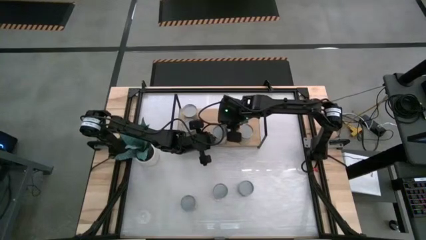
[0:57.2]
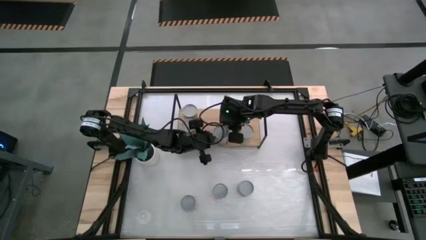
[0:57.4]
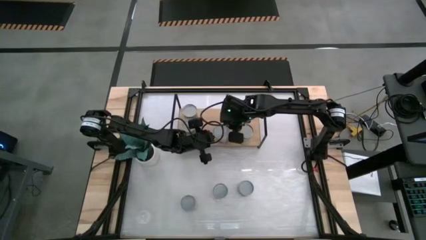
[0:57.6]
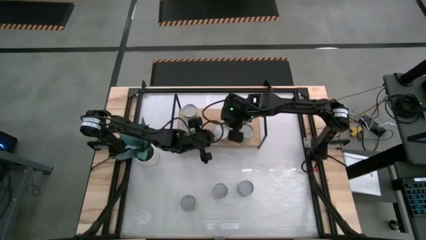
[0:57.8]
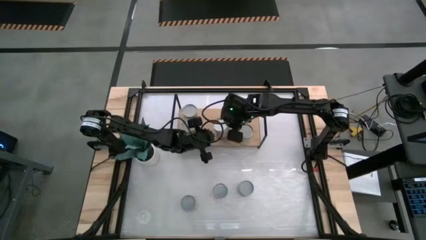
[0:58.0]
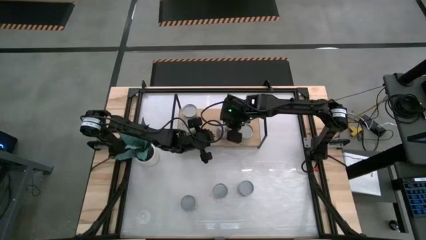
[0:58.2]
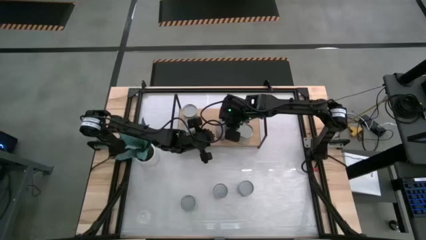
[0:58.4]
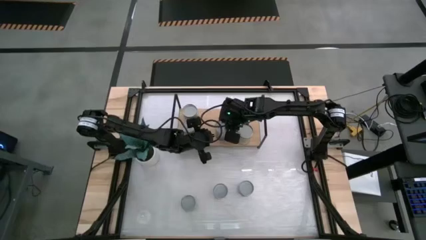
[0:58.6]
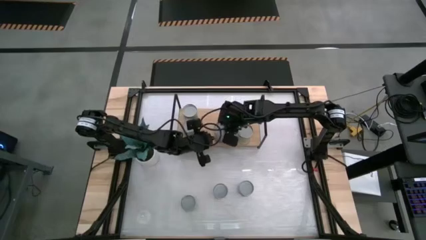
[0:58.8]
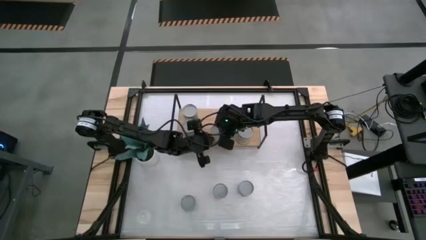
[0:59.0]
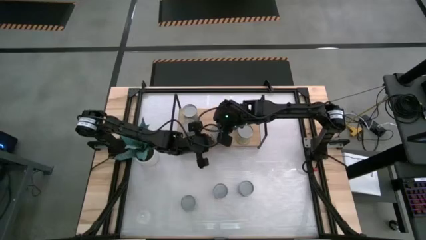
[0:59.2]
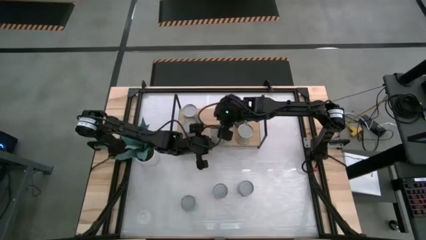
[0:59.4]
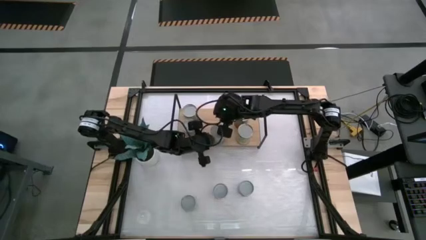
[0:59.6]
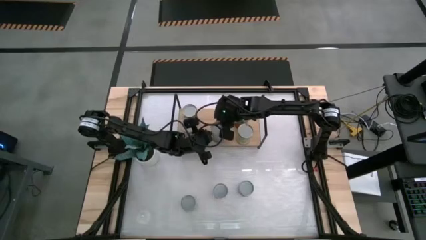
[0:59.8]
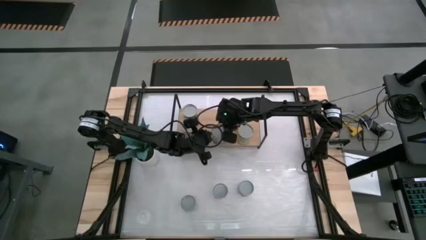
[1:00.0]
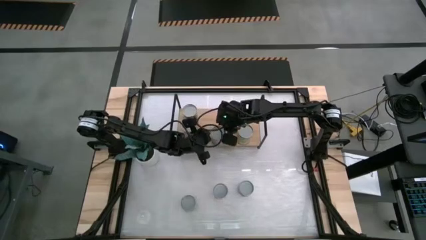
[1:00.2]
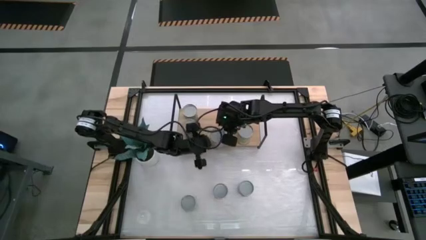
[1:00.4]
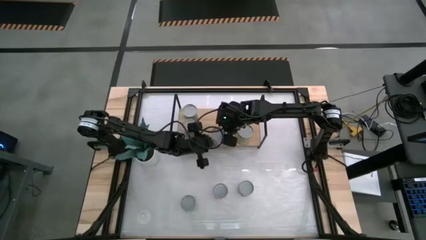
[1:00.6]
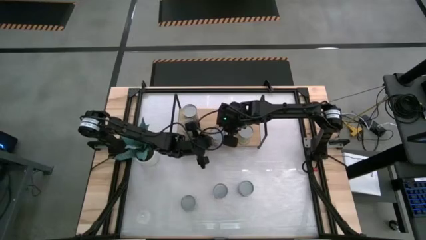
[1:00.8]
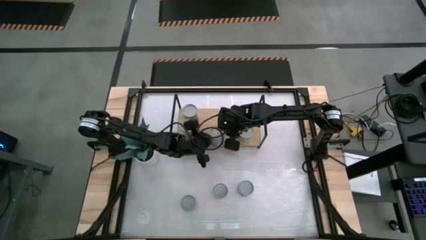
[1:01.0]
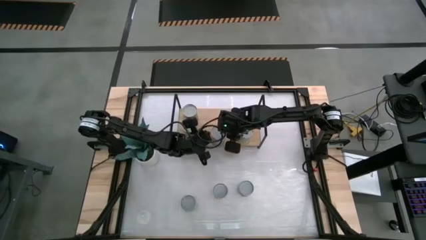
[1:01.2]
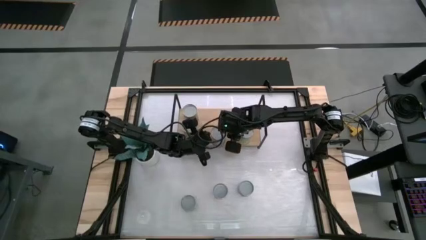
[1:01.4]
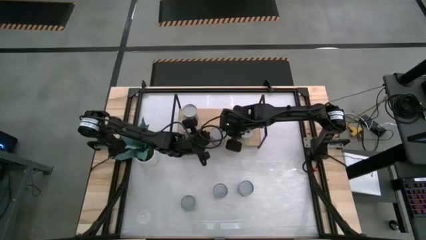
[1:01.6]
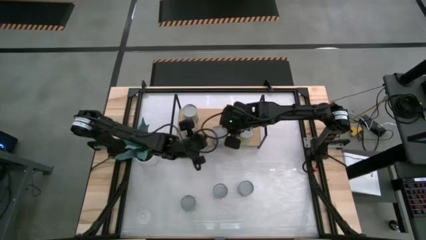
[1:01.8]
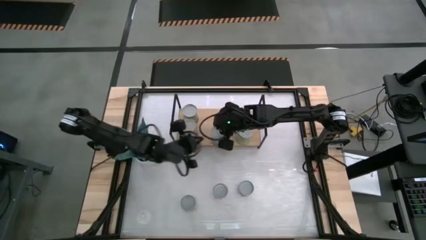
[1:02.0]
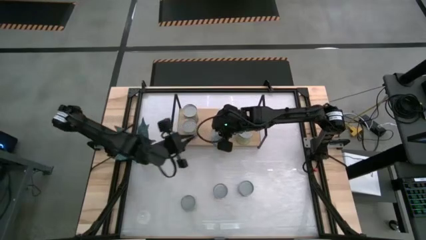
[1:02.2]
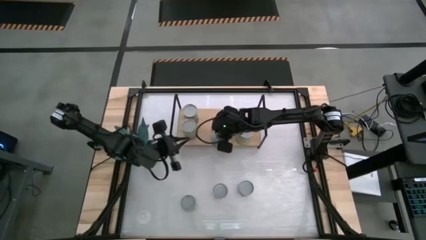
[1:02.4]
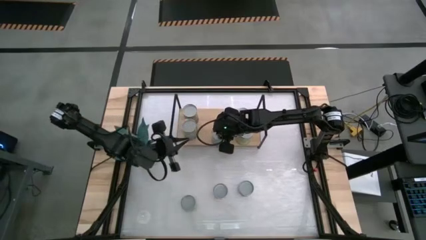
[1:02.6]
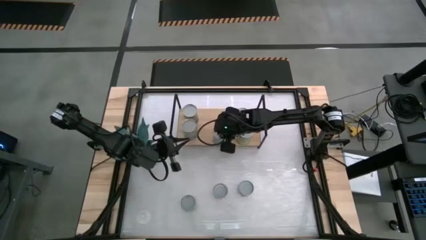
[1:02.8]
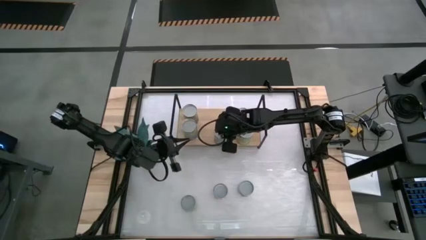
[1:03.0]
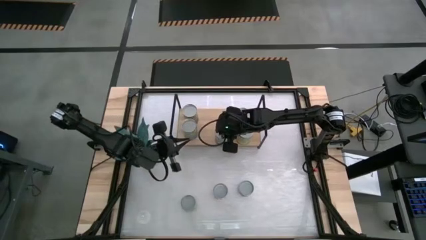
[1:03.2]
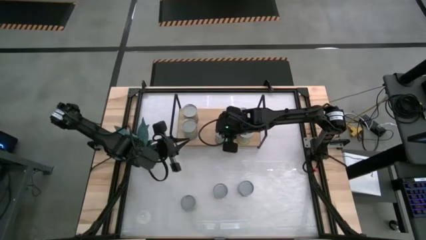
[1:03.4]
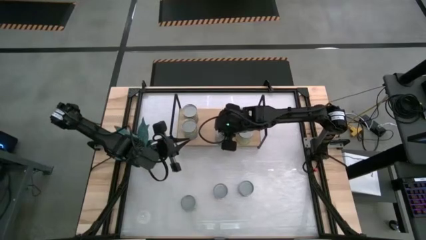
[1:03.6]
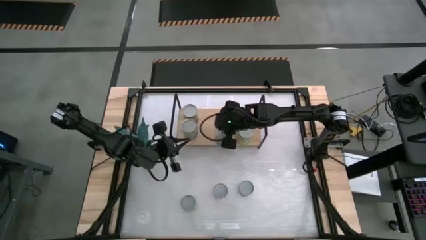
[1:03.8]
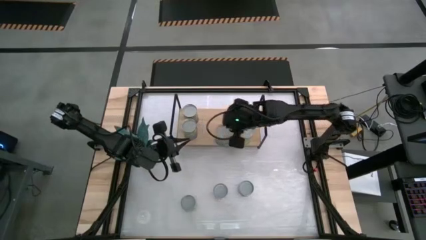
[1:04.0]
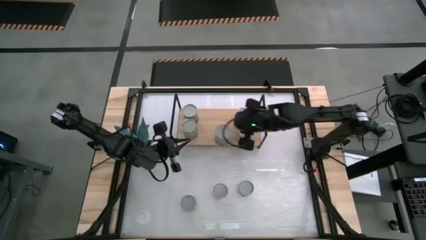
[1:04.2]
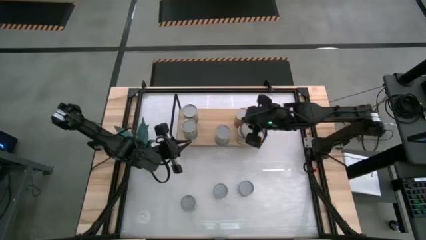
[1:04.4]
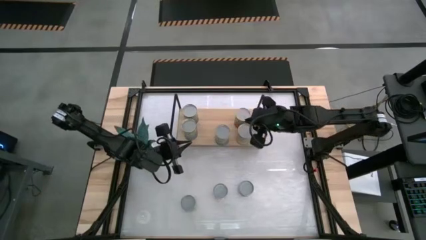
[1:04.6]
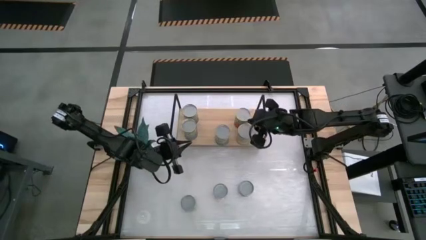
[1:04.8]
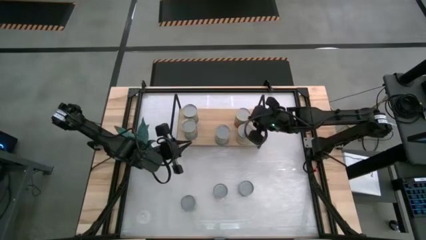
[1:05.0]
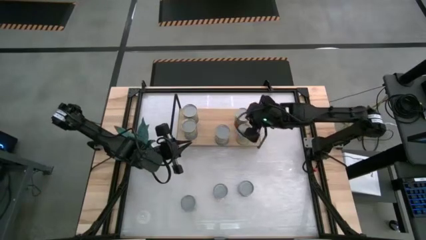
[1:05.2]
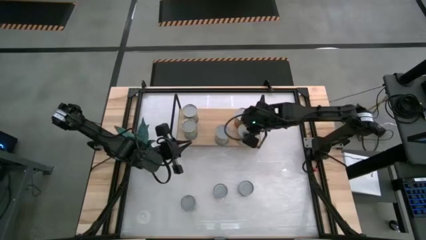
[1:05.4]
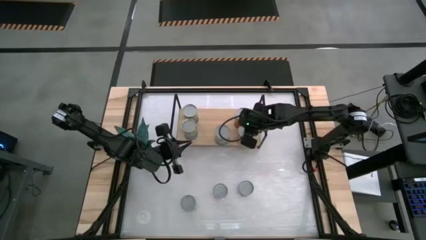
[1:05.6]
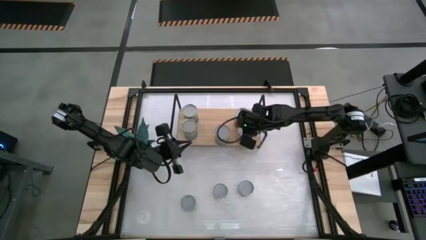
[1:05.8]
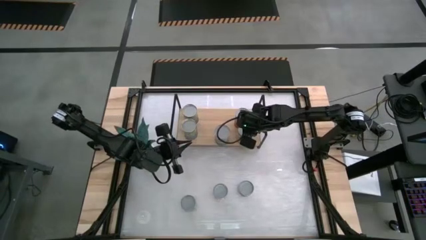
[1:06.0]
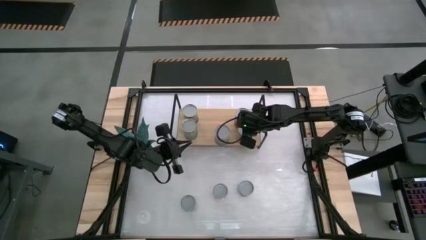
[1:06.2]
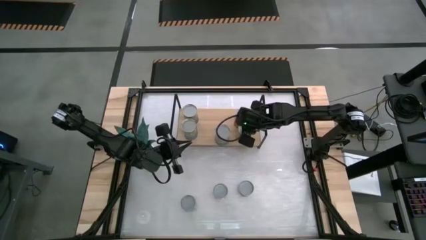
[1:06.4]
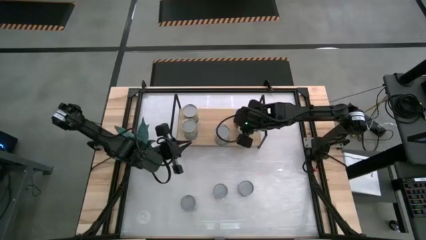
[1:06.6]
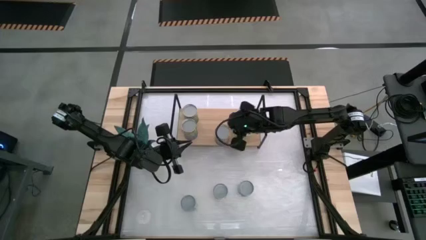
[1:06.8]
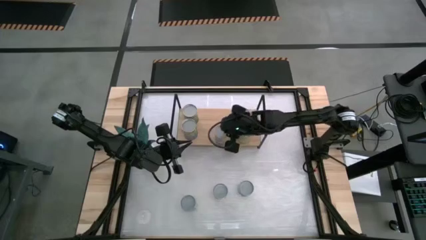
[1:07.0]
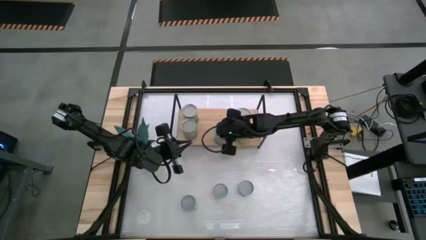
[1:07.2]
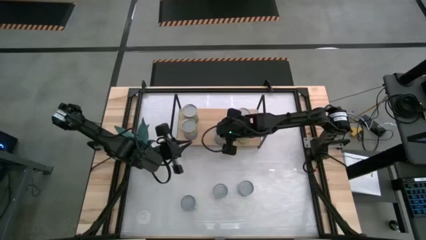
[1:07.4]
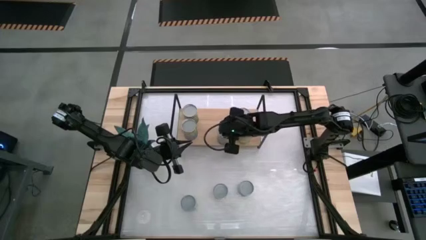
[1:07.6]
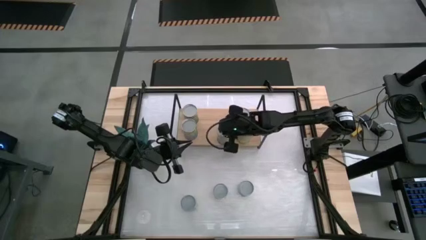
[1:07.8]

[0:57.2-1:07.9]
Task: Pick and place cans onto a shelf
Put the large canned peas on the shelf

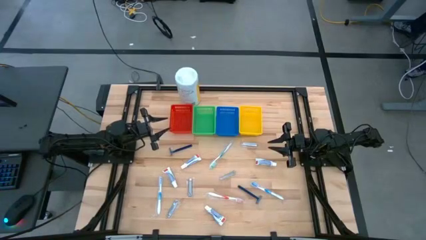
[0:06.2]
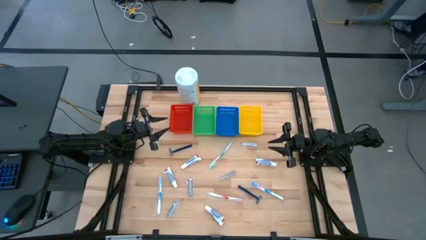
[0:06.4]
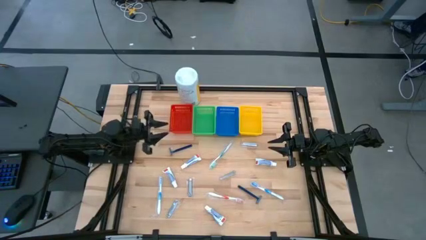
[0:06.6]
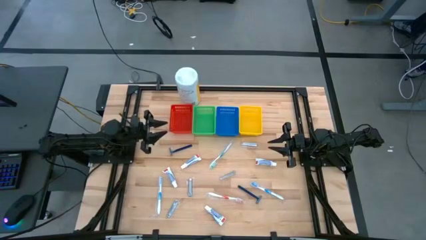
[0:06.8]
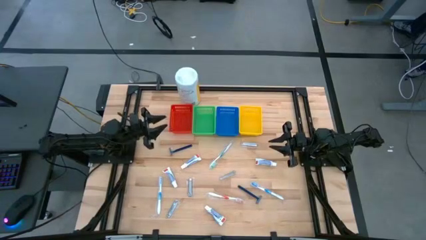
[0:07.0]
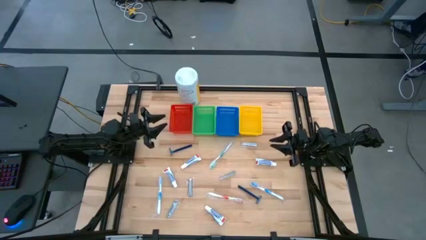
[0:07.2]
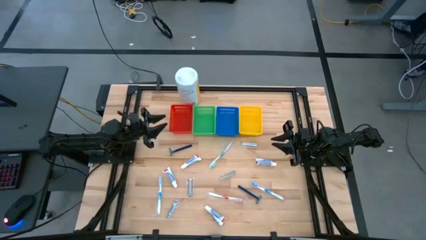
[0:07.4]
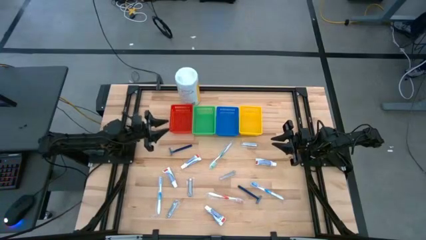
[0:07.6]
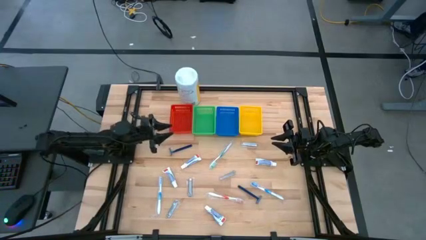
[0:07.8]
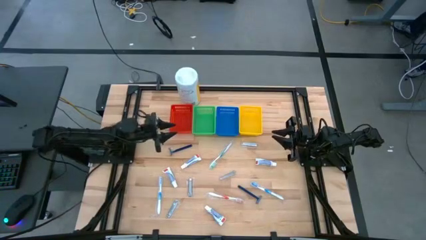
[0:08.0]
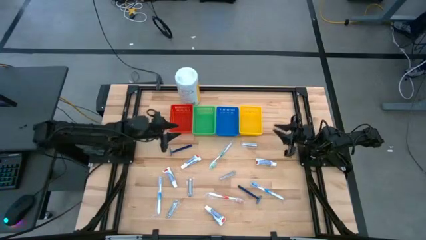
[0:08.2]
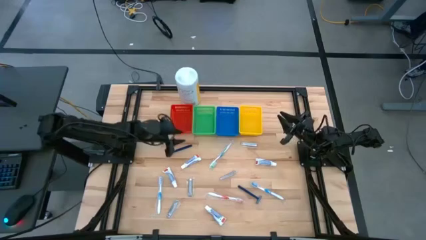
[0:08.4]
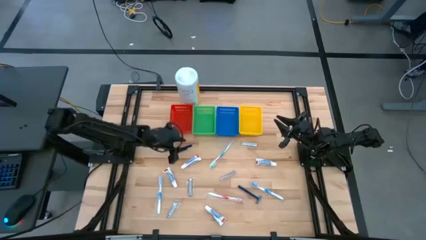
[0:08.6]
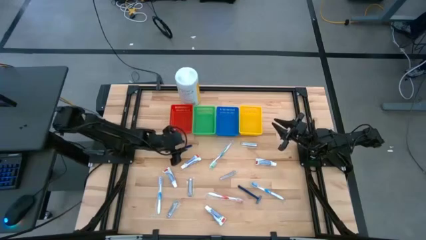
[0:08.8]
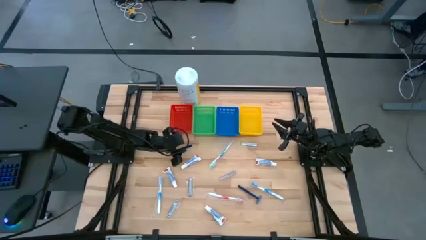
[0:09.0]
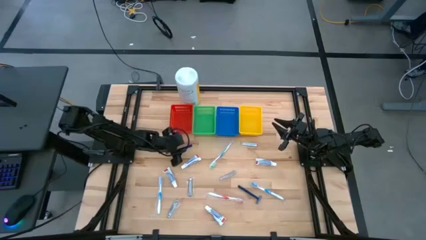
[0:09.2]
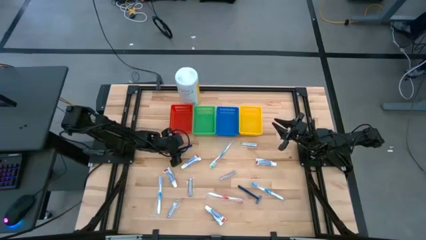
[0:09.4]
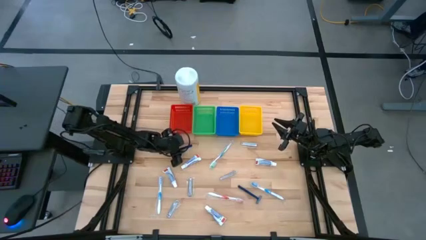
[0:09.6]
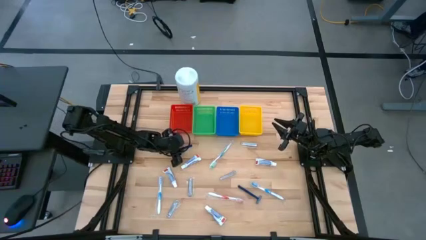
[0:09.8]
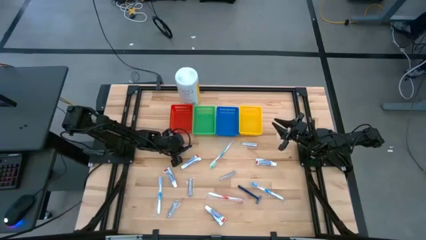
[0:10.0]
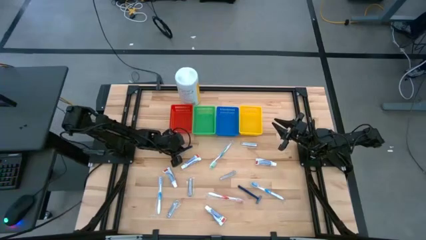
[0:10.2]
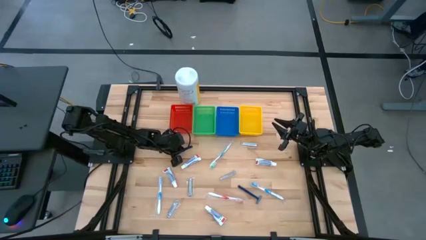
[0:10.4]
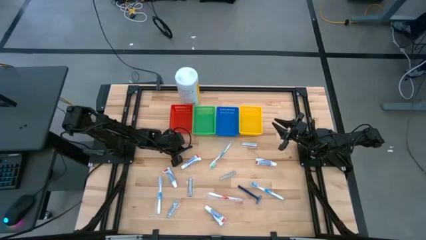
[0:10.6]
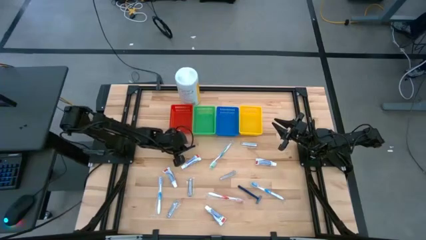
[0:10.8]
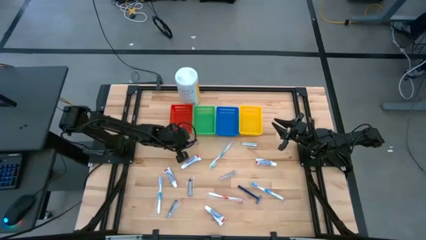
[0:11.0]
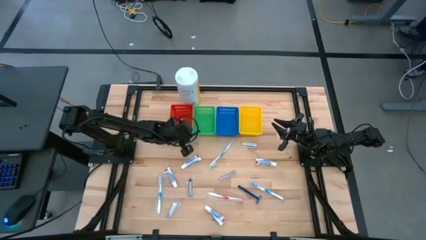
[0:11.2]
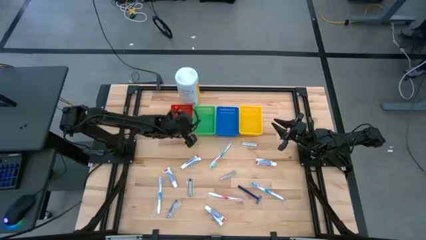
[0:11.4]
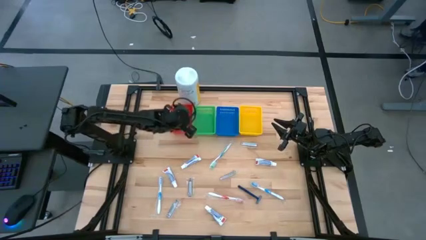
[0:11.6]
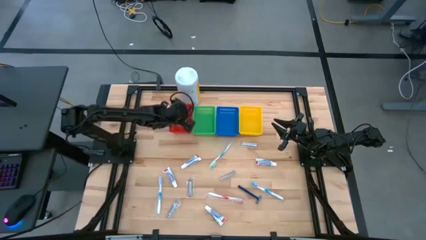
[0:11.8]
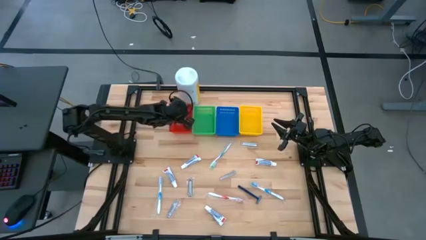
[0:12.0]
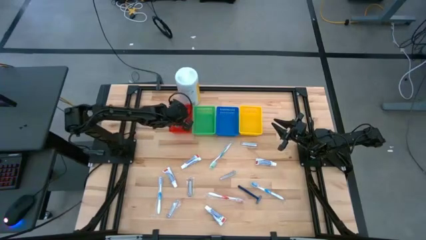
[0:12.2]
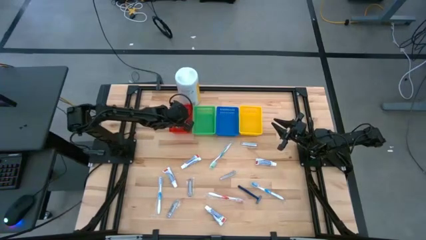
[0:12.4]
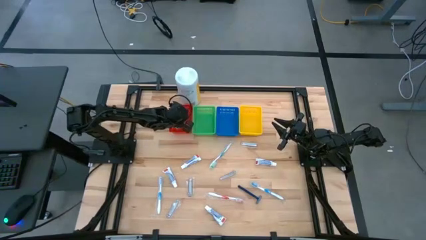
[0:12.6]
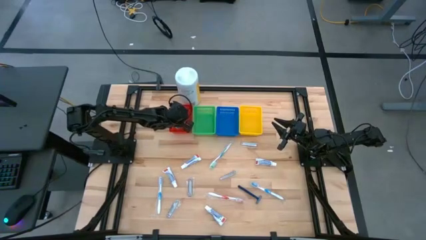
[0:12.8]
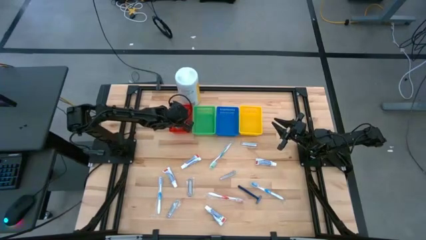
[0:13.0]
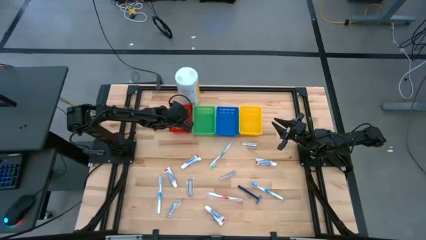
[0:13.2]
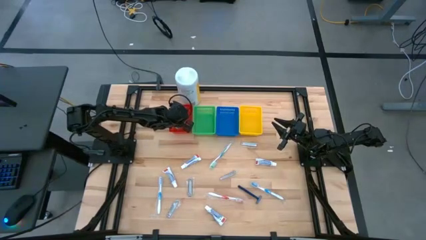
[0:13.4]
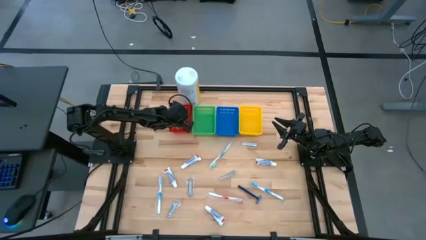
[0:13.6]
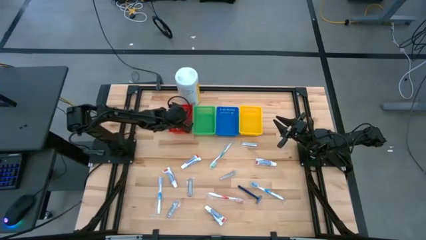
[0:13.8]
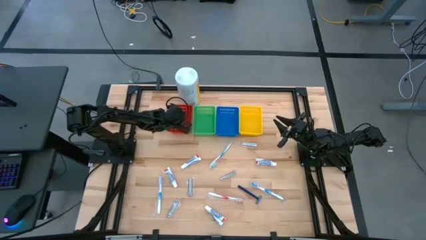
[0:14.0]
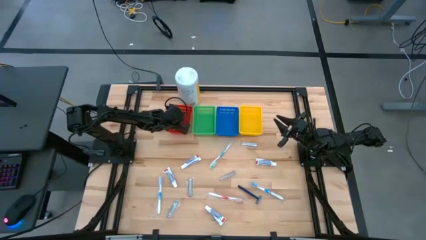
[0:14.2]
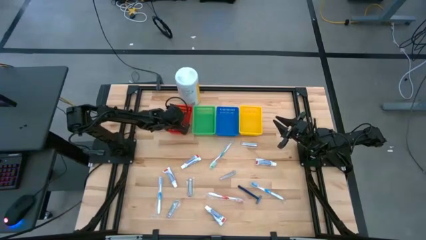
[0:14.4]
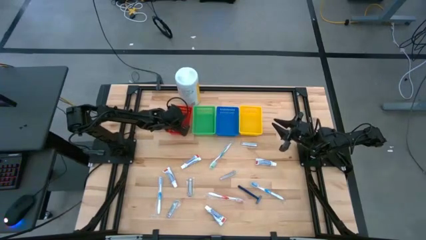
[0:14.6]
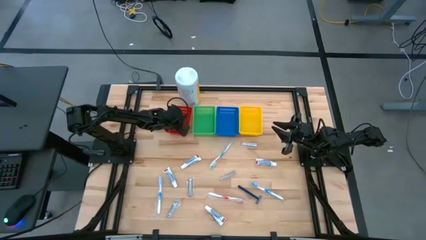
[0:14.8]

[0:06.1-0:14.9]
Task: Pick & Place Travel size toiletries
Put the blue razor into the orange bin
